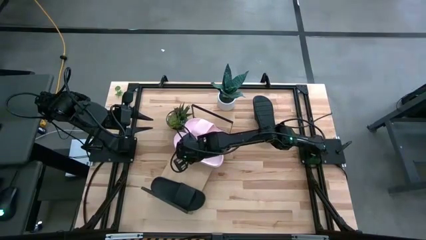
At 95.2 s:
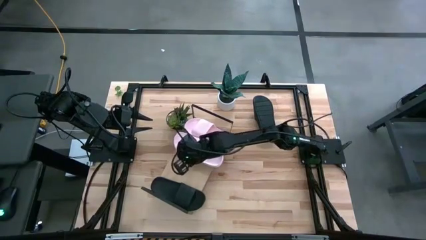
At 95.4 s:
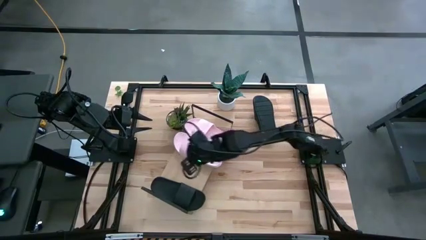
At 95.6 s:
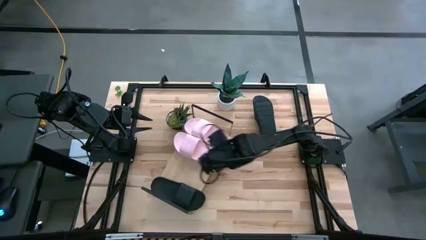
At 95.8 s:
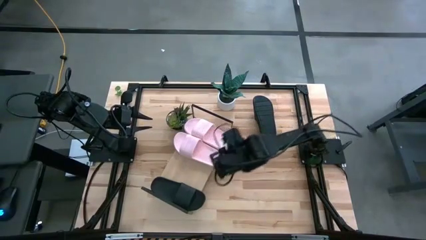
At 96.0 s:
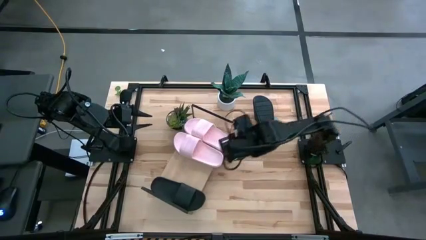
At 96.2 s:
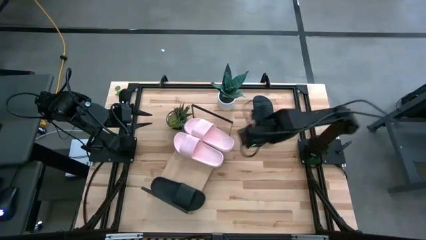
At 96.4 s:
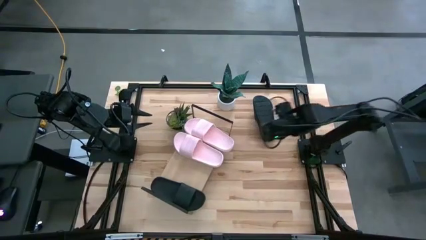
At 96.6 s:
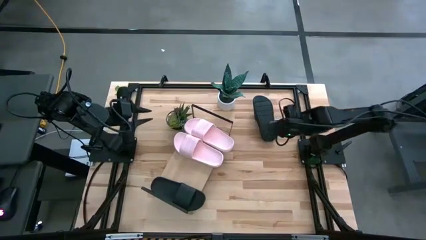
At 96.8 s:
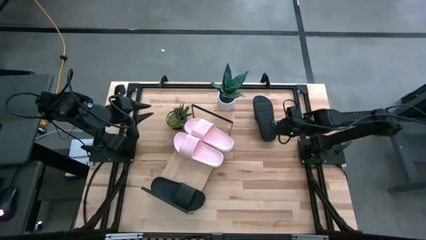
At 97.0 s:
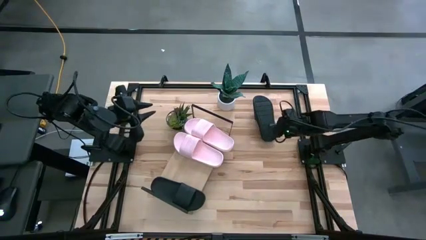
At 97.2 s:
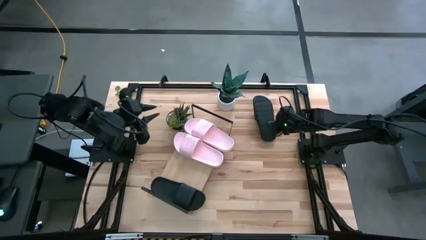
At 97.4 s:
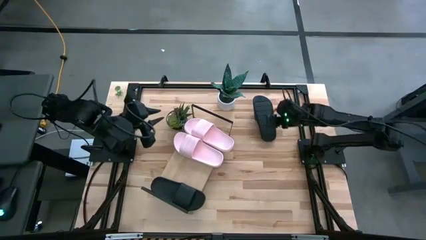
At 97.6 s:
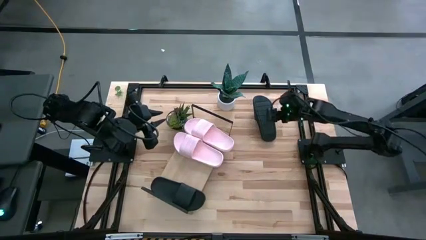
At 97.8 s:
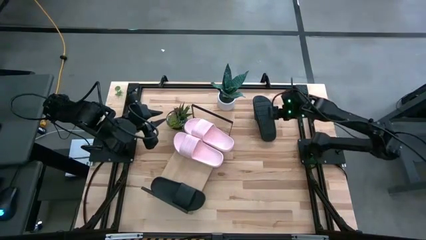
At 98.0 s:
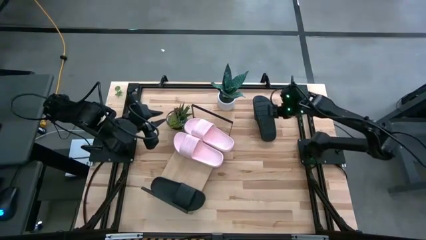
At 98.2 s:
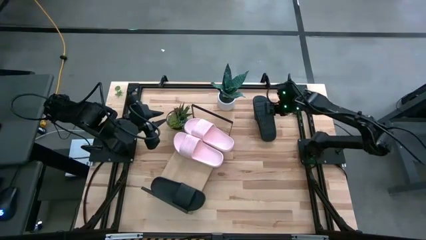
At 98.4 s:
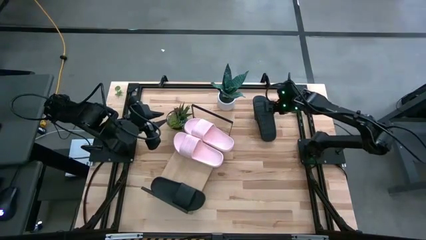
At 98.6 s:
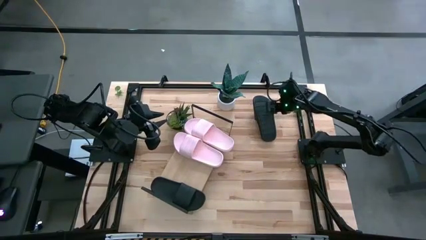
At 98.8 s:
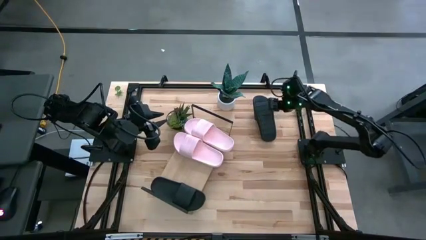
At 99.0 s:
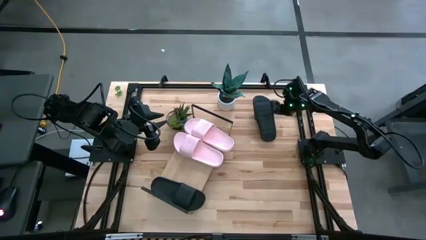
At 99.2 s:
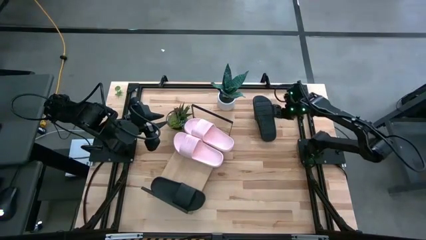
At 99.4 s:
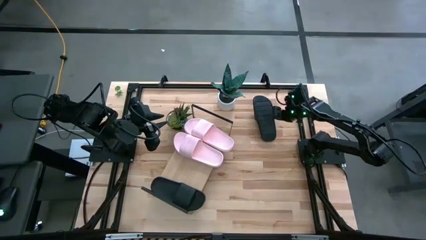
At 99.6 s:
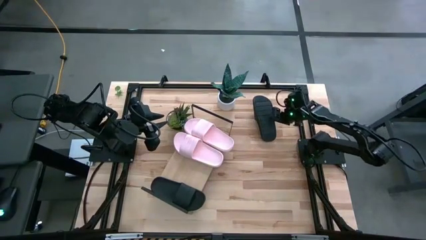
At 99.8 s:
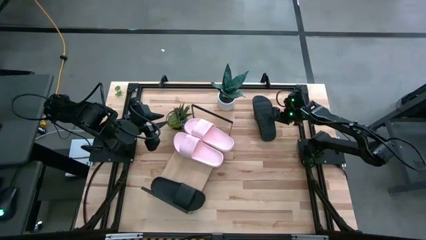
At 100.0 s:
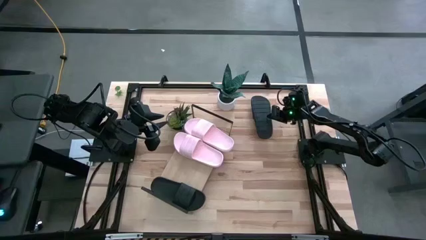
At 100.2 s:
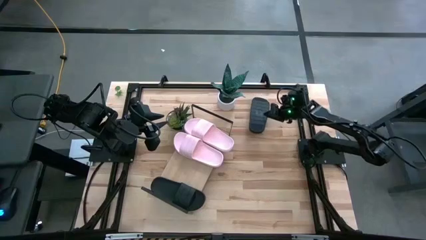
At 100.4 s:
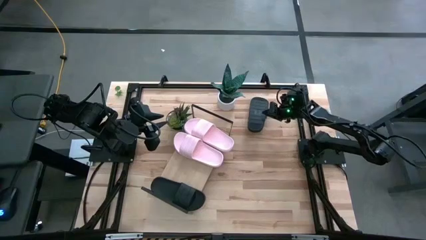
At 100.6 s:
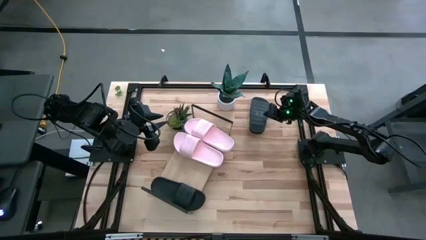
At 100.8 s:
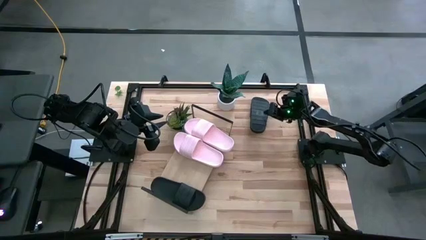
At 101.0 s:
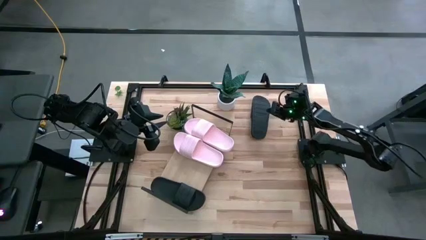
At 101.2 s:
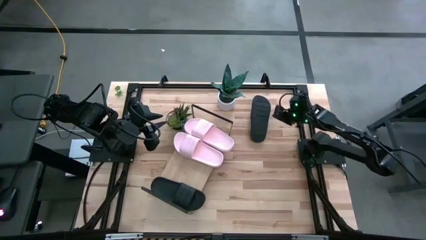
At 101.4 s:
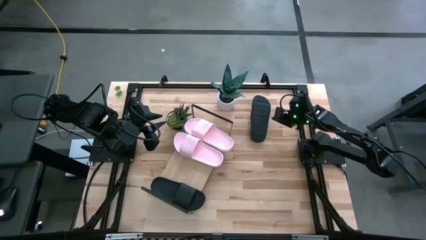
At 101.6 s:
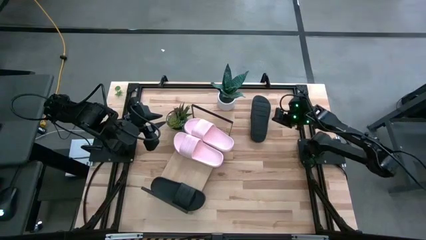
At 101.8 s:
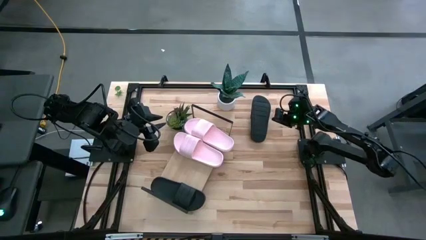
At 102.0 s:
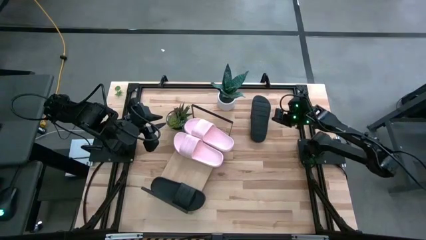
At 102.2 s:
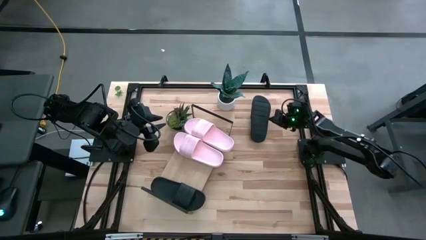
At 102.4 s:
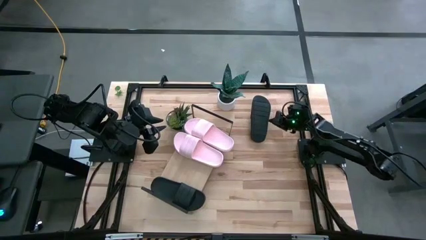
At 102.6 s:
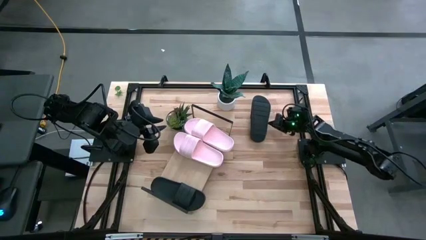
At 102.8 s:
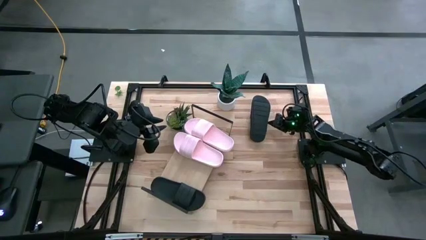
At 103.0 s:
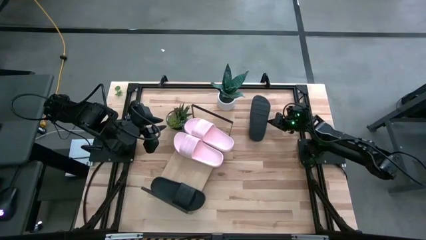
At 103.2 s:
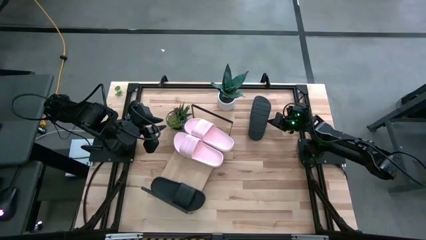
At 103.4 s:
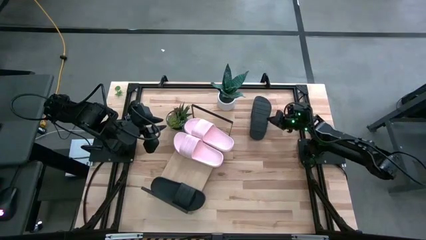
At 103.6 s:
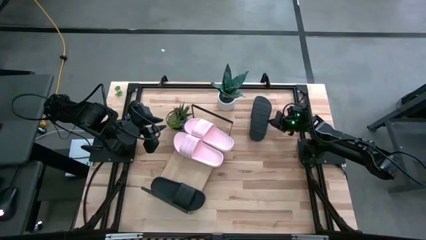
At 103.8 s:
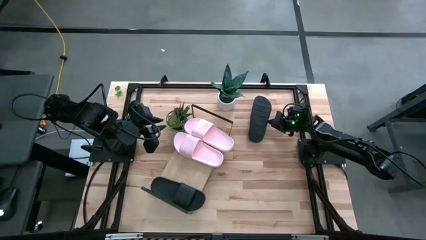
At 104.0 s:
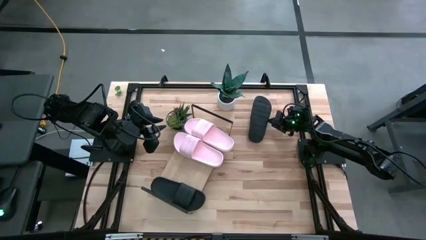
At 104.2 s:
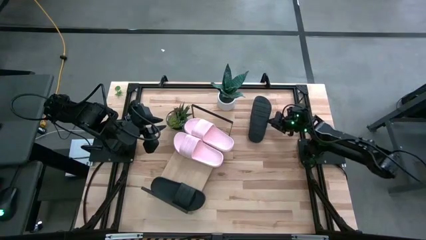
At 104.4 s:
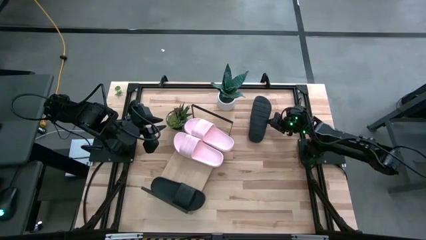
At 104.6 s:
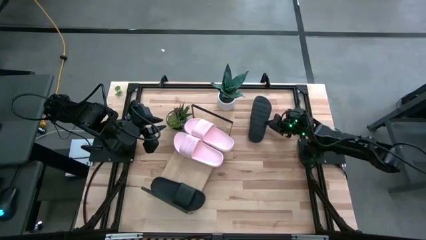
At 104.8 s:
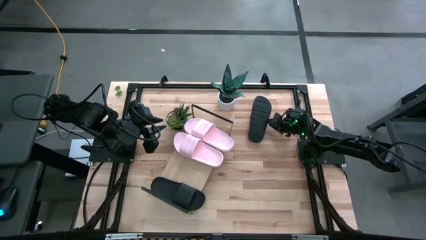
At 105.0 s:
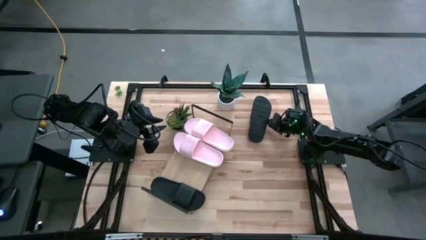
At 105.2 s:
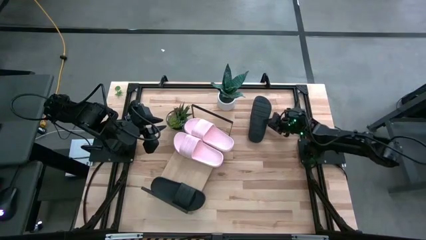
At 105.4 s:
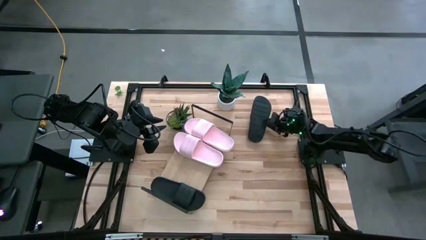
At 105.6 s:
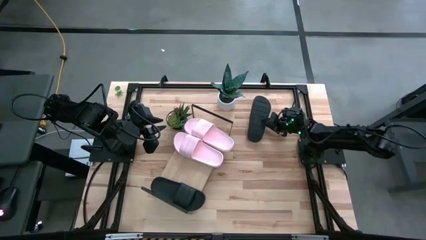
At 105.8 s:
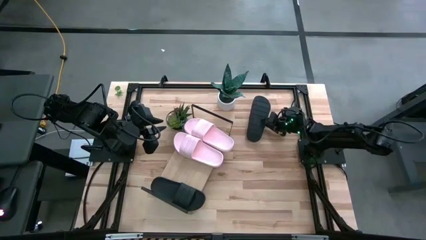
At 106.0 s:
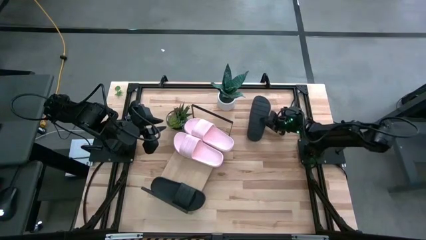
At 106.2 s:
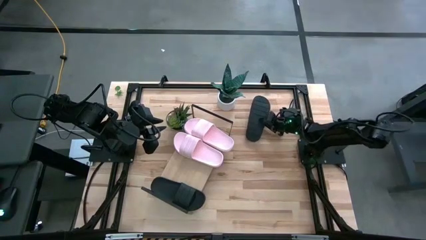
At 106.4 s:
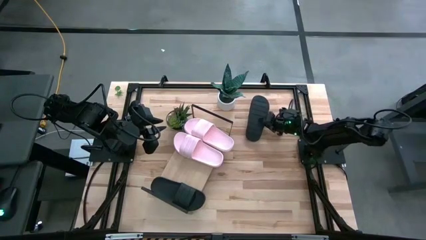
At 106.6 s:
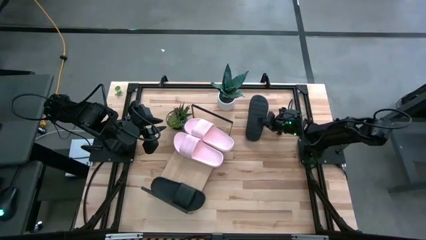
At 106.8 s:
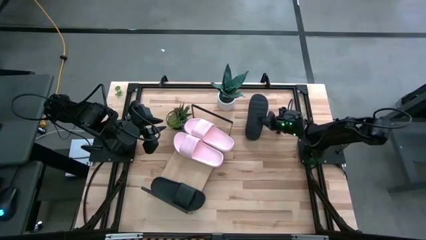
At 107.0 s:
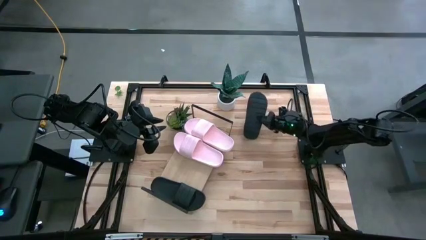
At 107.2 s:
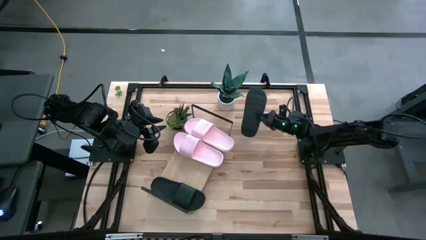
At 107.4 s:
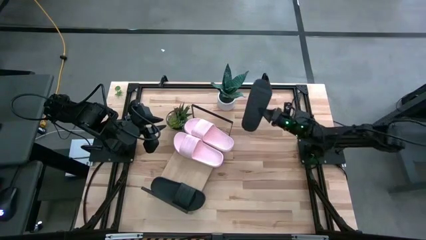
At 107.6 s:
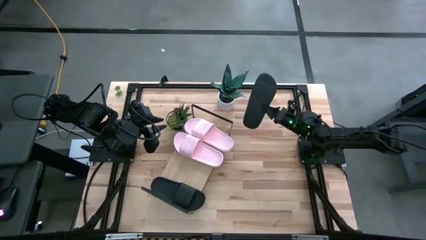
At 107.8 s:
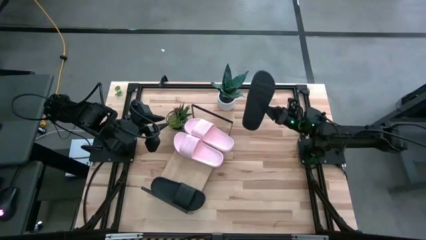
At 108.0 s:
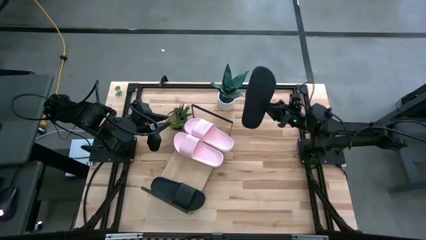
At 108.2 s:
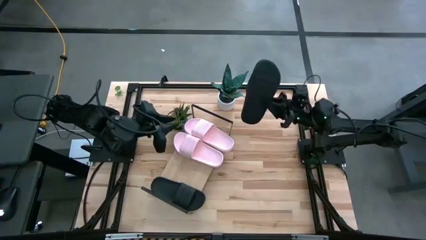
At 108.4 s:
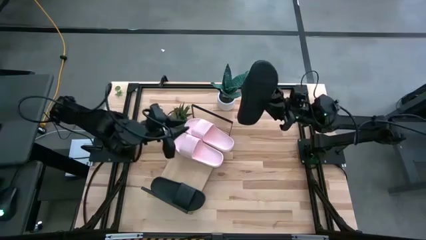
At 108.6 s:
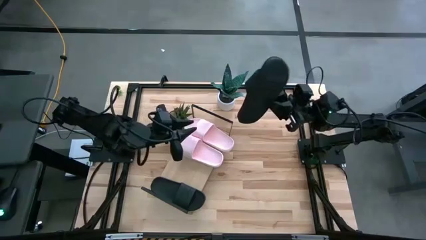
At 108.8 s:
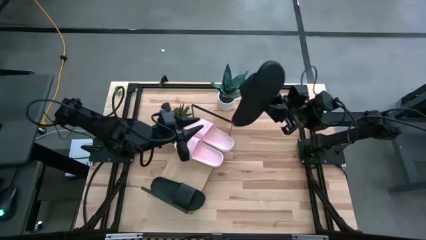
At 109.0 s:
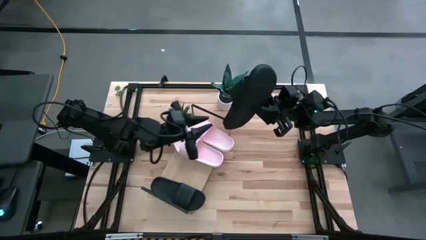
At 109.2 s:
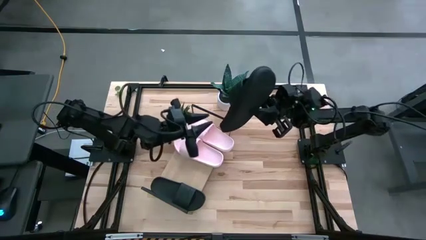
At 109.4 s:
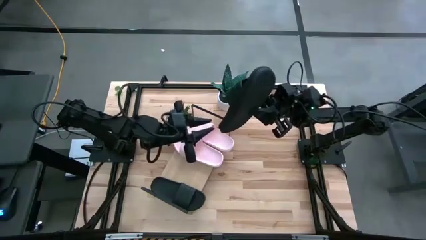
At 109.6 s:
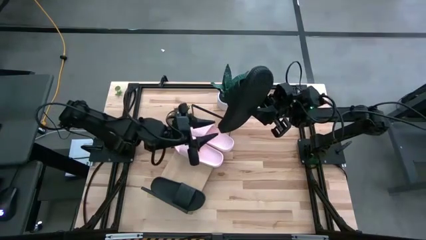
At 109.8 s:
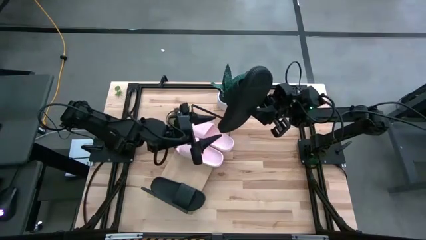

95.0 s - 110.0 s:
Task: Pick and place slides into the shelf
Put the black slide on the shelf

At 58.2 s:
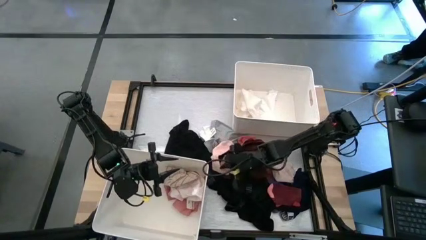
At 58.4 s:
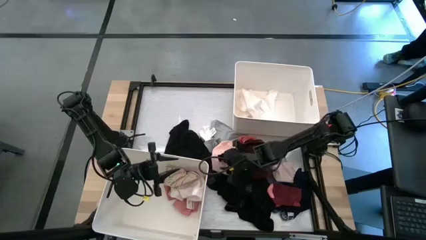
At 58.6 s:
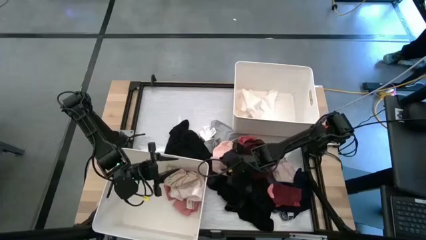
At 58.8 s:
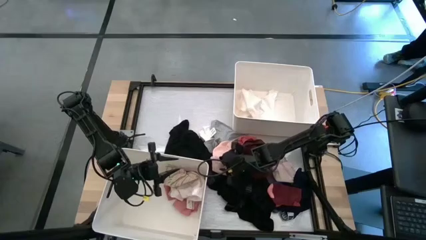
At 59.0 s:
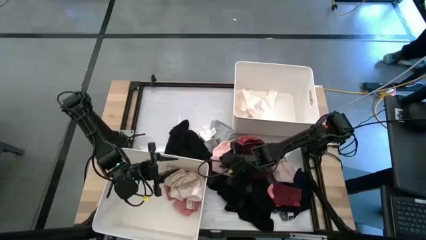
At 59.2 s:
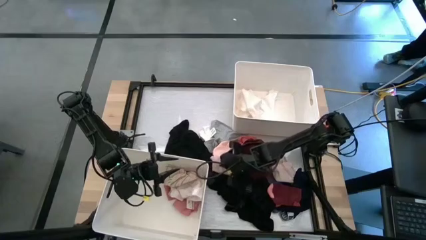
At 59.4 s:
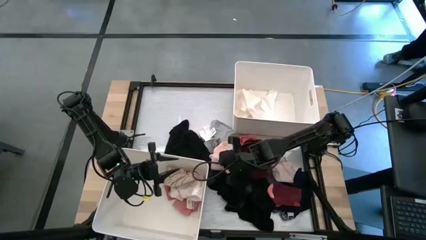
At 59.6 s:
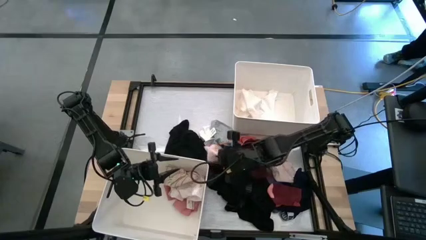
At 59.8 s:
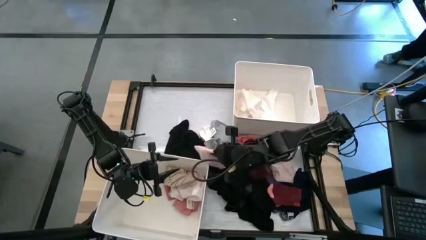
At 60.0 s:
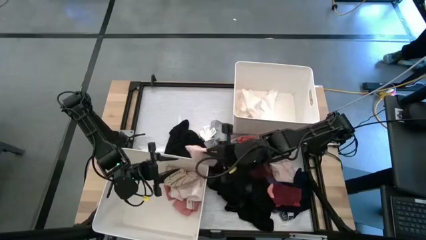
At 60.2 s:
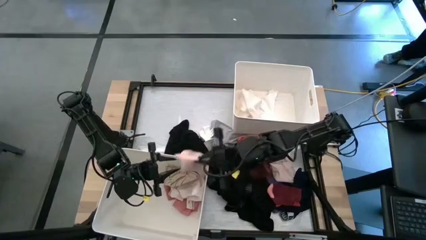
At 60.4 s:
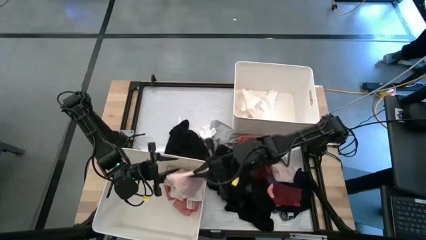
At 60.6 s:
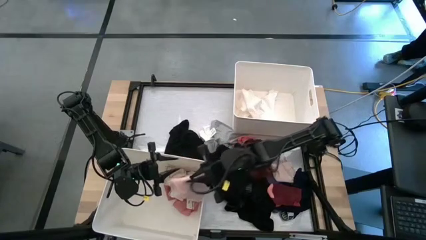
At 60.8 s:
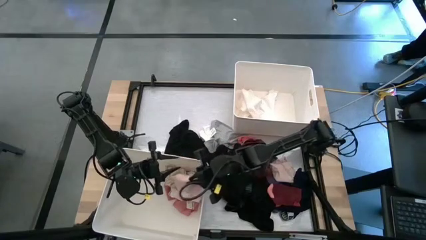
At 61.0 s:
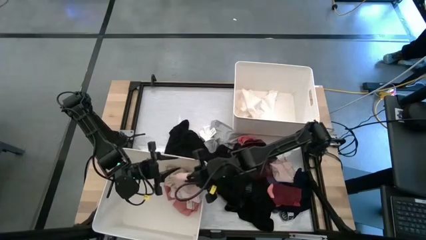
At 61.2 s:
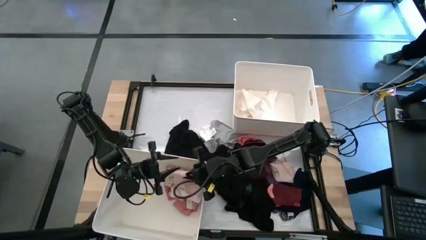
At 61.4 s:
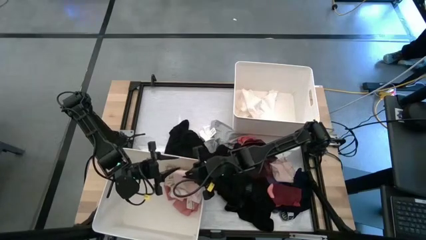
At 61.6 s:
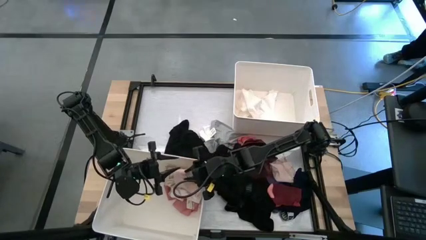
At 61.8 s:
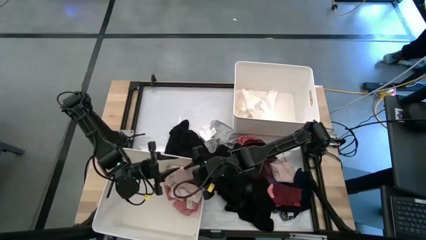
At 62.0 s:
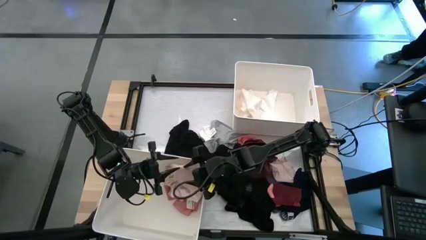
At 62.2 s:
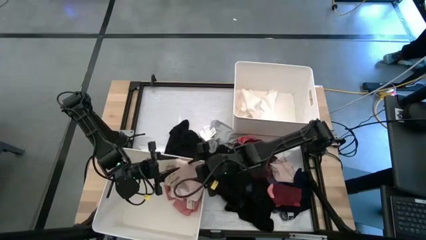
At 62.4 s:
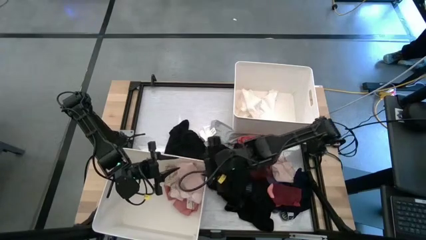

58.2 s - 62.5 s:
Task: Sort clothes
Put the pink sock into the bottom white bin
